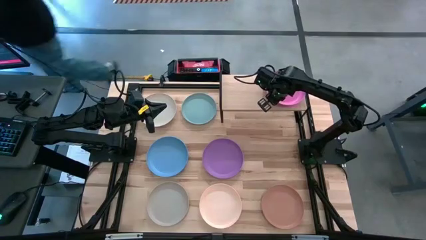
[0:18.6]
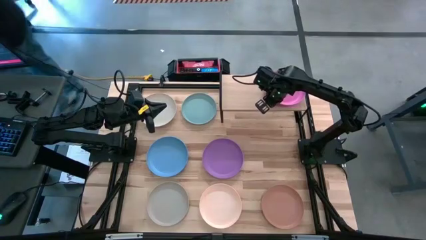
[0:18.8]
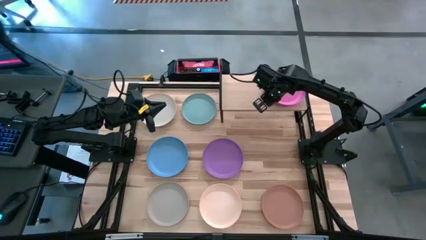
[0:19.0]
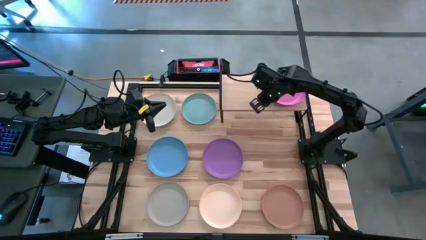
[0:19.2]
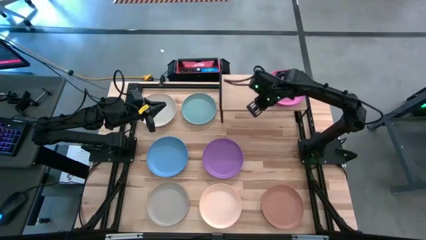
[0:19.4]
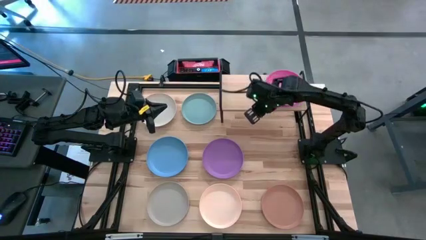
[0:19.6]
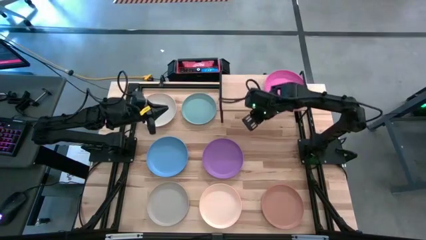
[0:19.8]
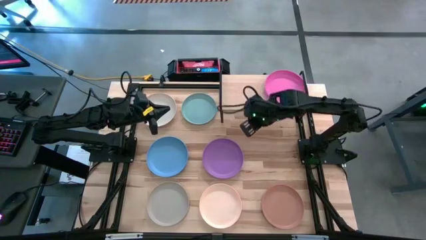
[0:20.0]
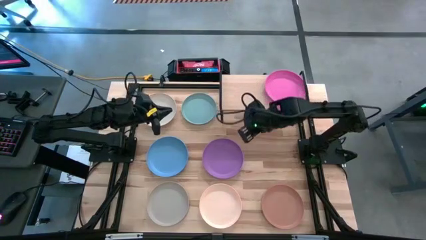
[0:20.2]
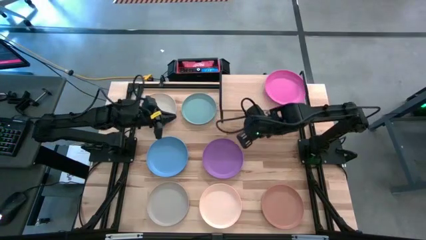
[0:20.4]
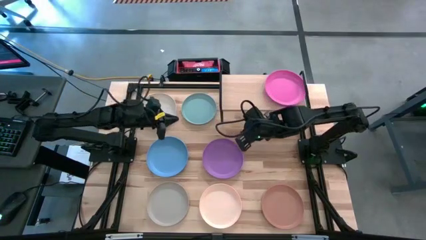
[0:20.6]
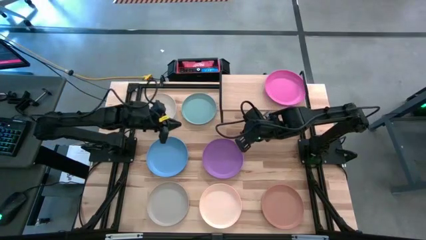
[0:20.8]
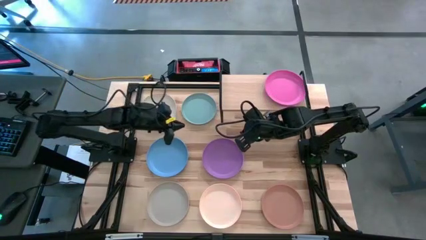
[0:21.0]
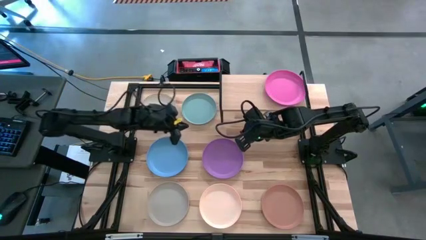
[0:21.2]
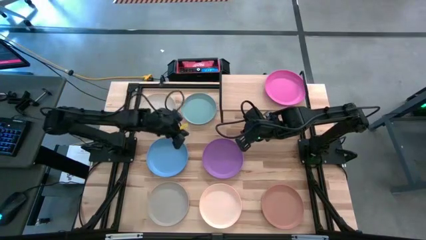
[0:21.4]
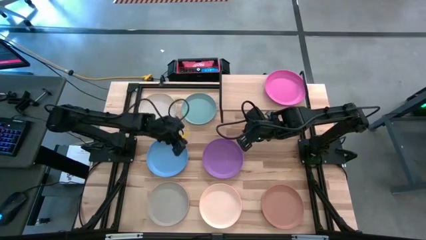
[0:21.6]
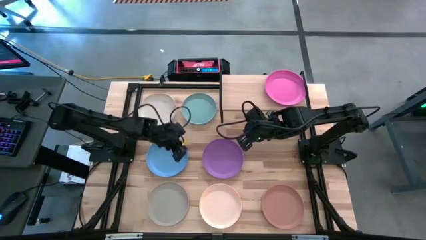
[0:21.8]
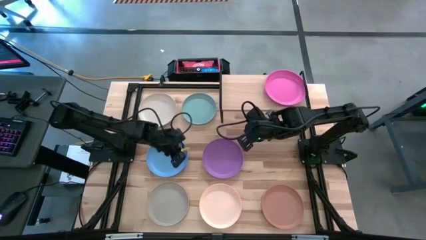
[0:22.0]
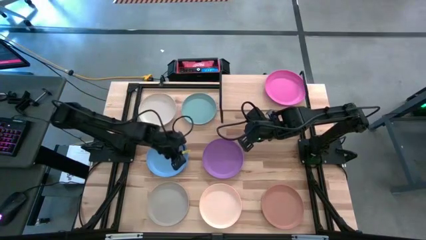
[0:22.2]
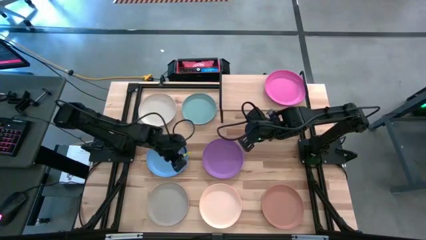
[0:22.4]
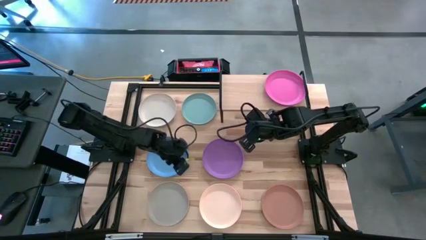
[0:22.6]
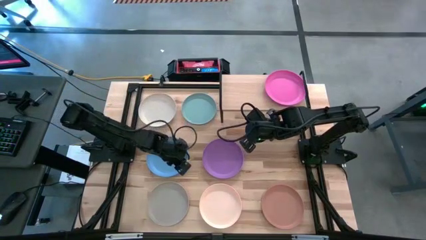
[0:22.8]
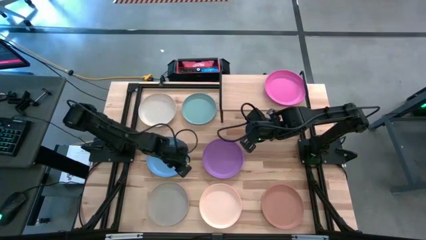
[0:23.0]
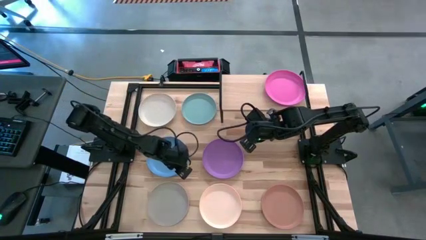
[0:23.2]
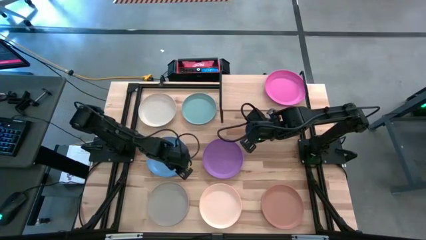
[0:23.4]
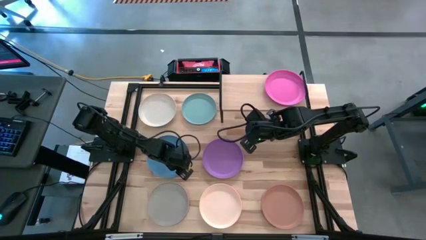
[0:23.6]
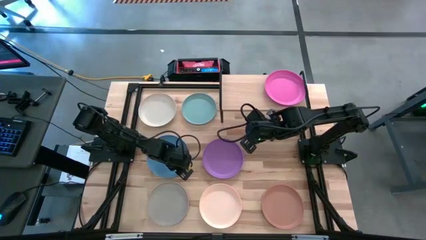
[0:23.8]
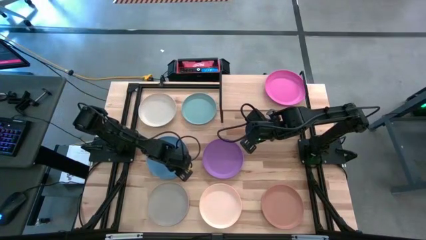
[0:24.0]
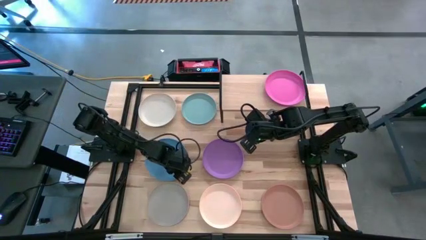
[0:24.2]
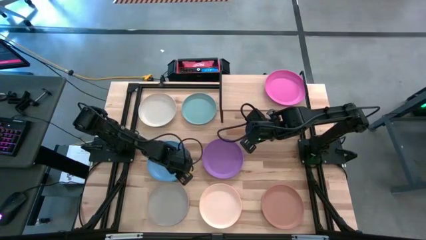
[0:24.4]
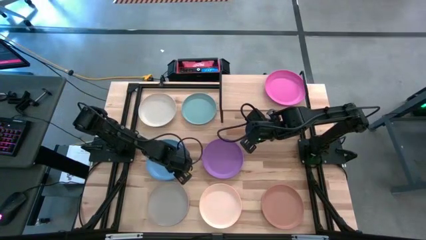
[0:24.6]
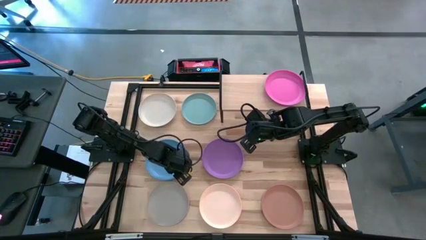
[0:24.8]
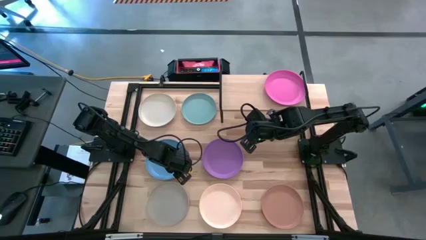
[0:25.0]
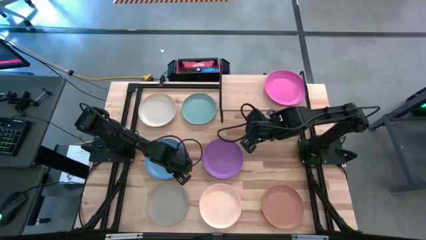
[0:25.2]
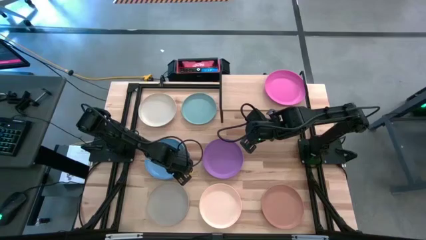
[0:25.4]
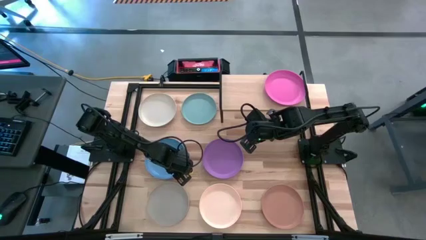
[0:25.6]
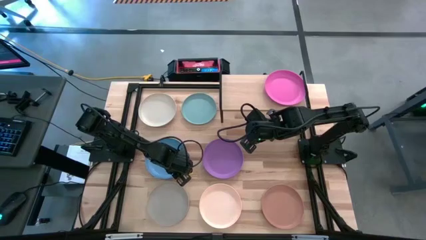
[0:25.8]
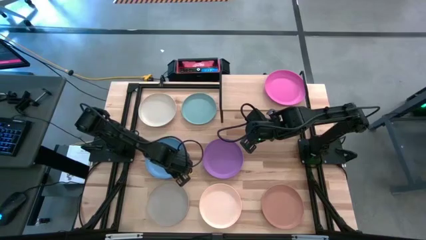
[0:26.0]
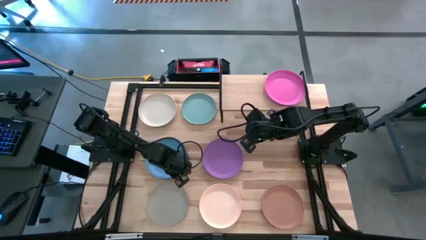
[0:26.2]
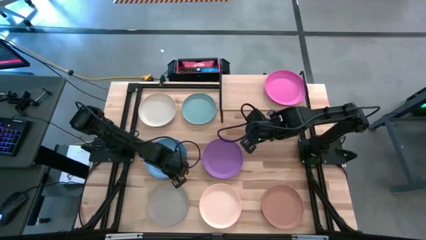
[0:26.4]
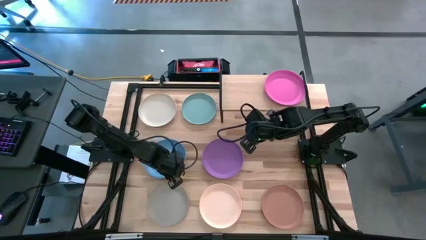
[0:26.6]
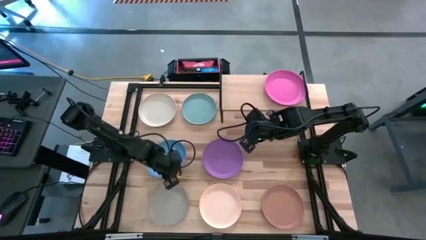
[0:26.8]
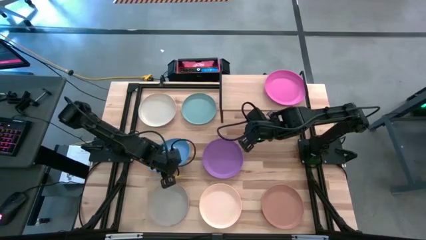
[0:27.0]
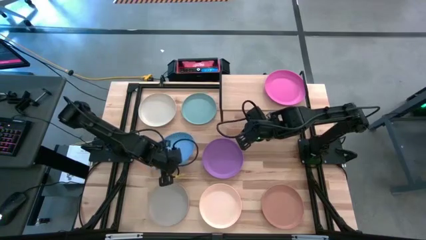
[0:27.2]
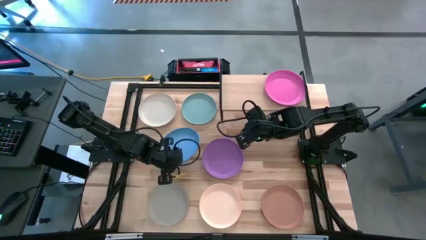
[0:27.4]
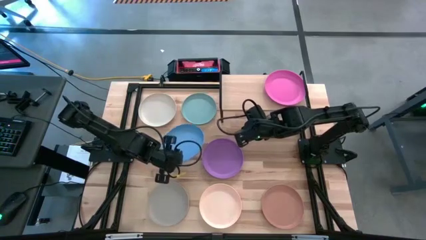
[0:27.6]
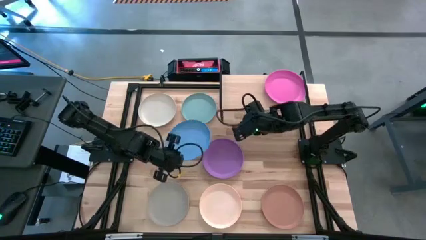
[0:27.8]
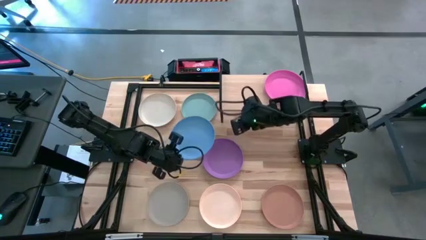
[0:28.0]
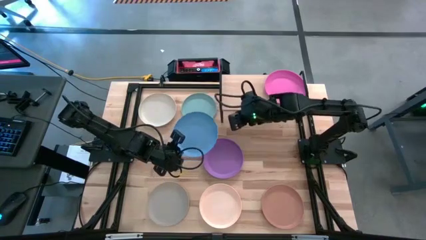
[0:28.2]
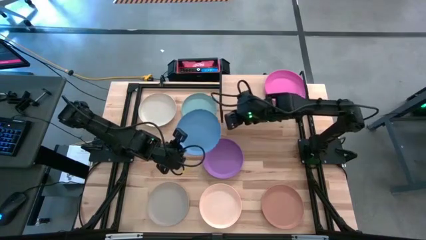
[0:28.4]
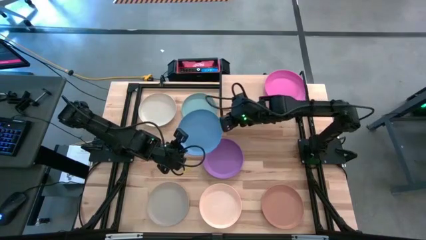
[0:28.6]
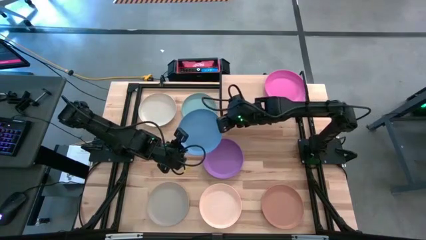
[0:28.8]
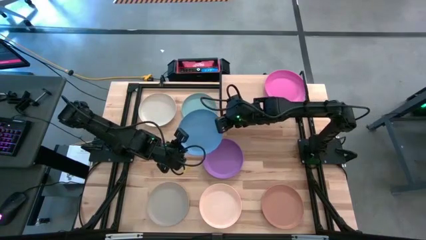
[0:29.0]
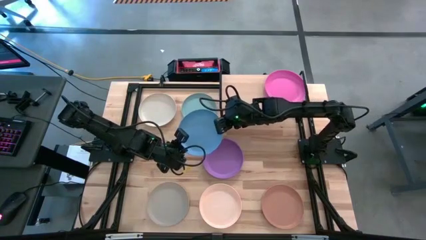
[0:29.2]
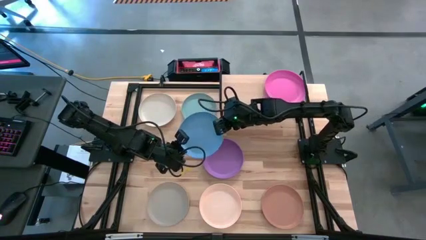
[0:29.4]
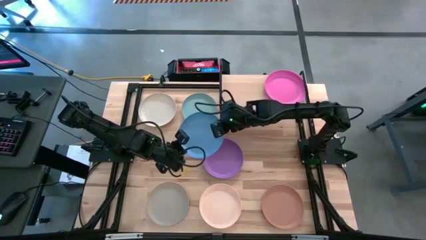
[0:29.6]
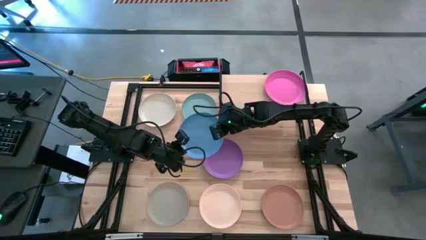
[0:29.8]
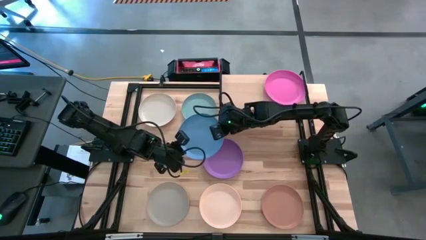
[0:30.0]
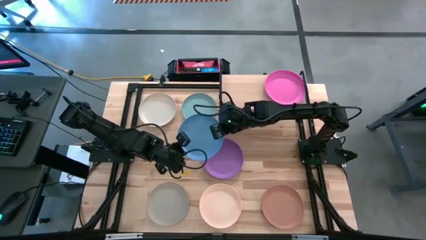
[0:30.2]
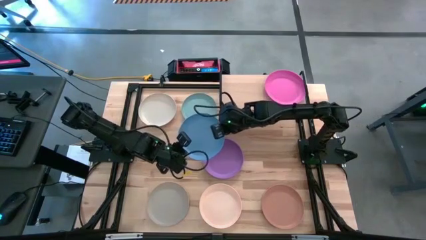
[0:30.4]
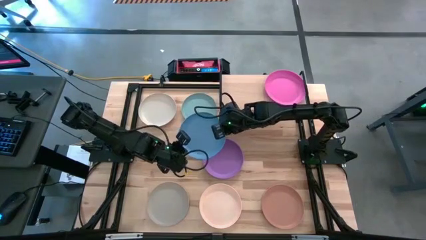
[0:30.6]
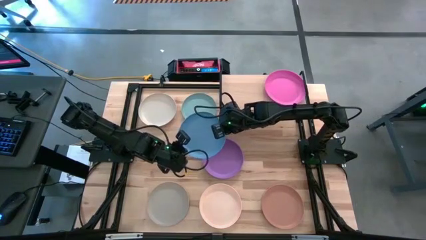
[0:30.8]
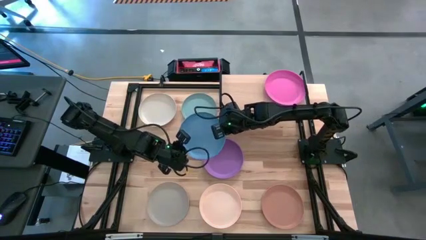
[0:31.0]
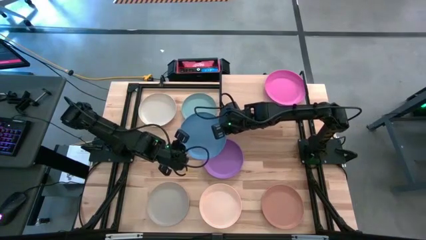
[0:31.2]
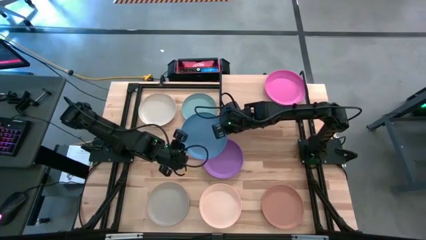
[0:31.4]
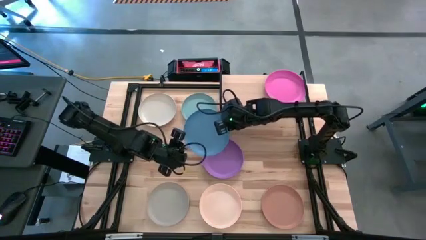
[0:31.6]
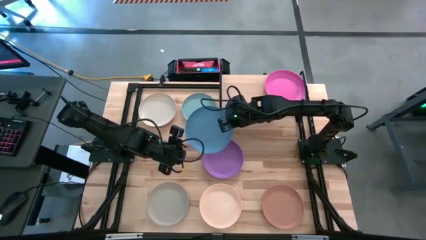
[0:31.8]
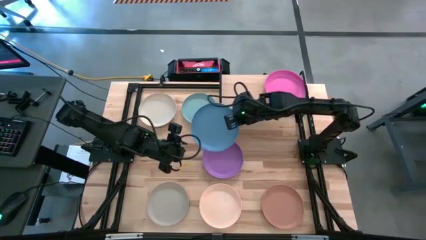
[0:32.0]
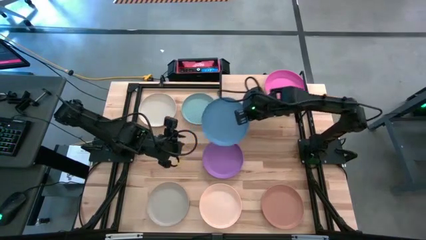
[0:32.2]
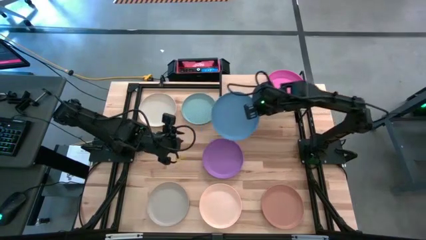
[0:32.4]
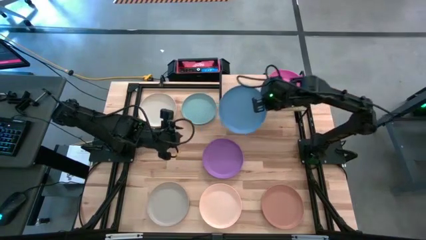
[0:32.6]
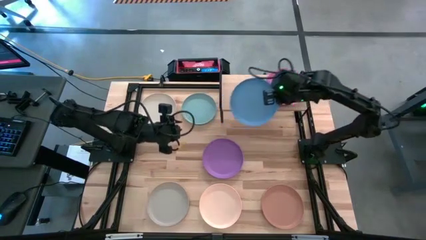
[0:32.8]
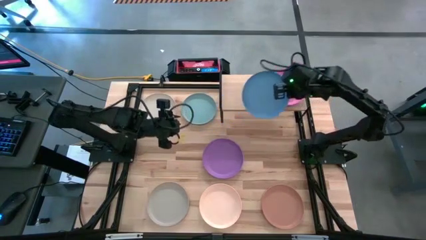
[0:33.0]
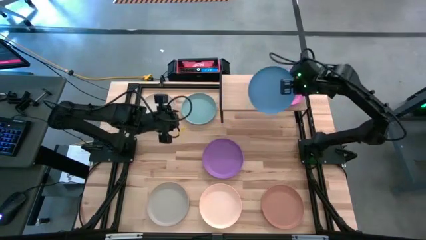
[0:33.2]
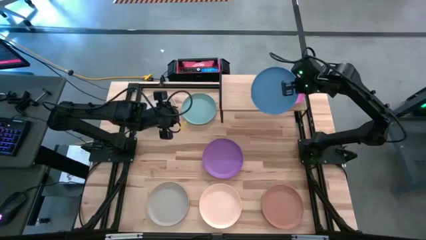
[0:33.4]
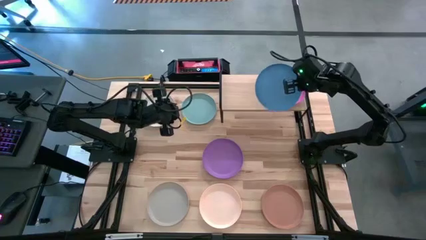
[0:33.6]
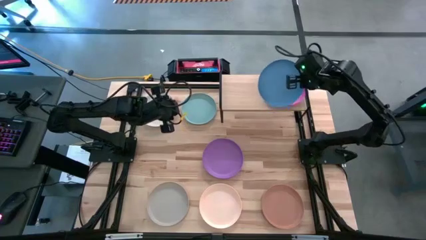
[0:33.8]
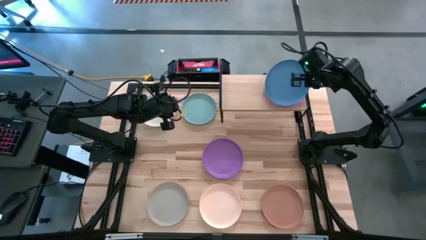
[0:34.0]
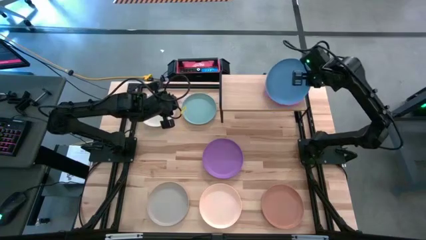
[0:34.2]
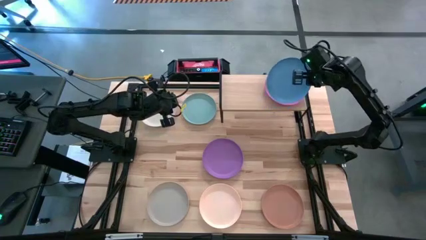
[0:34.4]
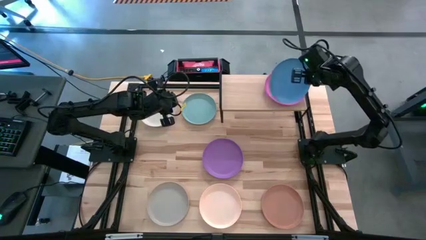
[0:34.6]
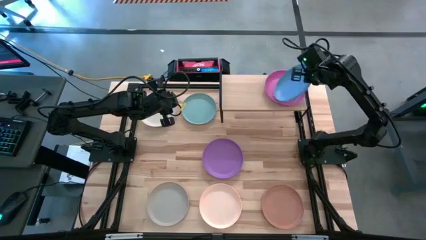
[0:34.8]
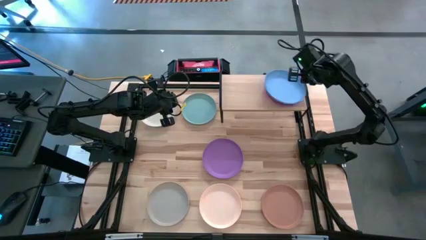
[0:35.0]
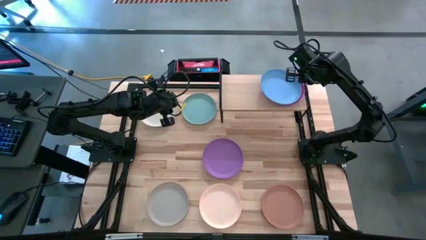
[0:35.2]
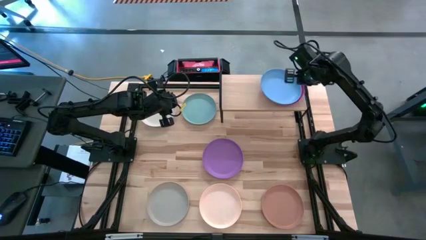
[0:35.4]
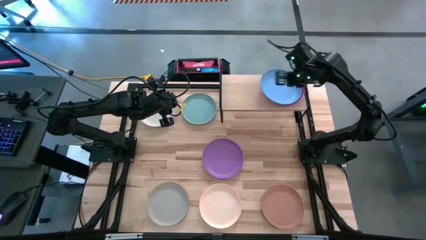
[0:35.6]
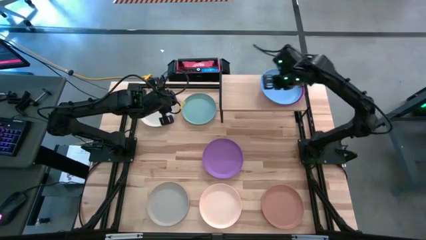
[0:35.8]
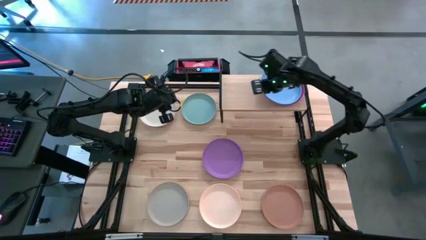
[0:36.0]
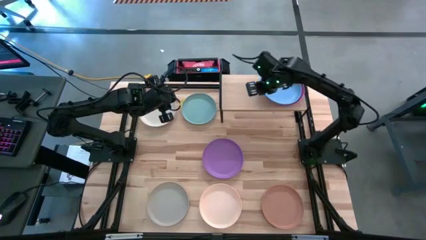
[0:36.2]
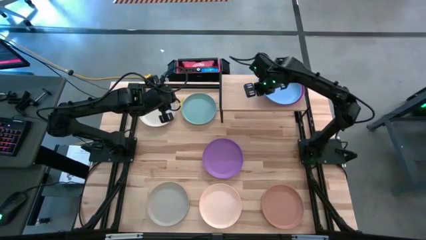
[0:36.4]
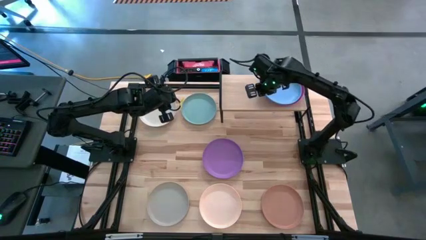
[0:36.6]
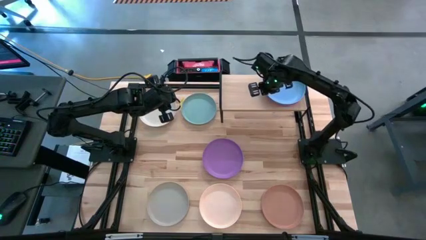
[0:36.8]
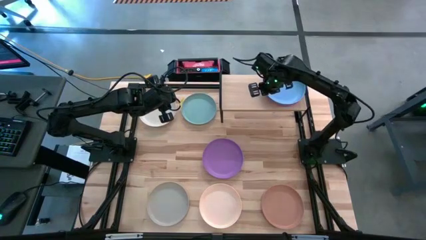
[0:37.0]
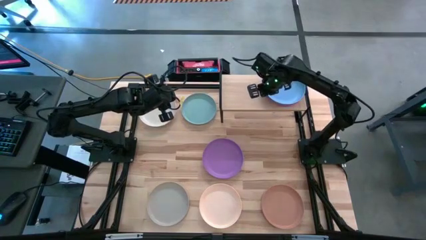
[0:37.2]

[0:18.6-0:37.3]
Task: Place and stack plates onto a shelf
Stack the blue plate on top of the pink plate on the shelf
